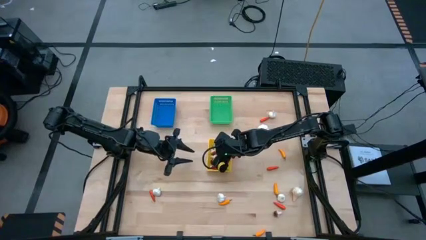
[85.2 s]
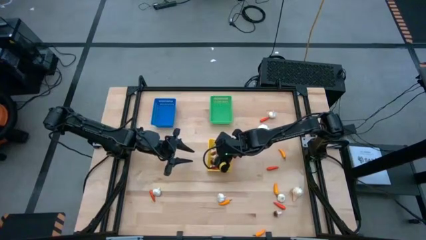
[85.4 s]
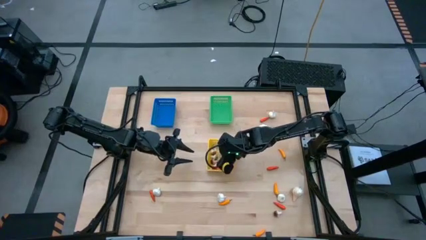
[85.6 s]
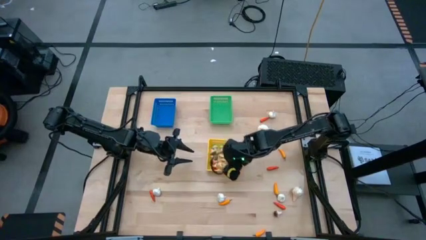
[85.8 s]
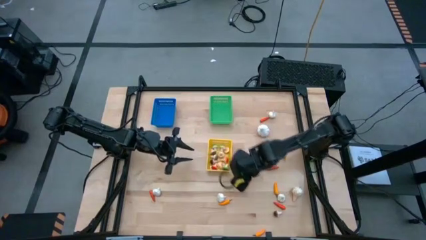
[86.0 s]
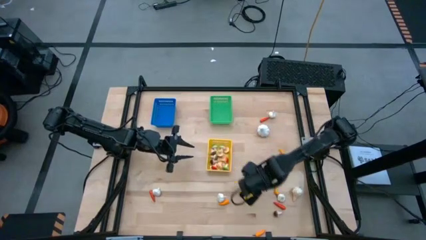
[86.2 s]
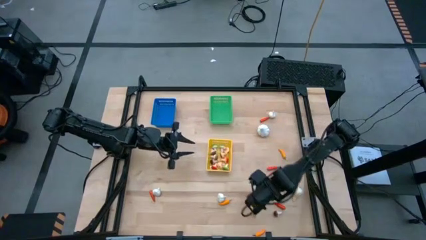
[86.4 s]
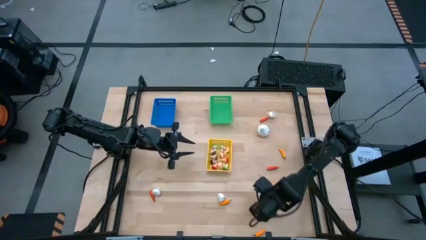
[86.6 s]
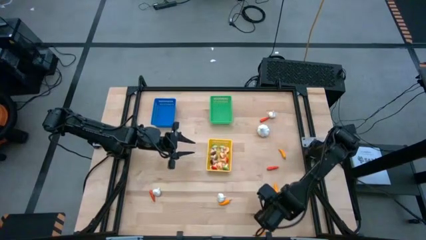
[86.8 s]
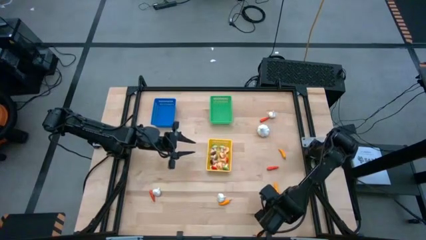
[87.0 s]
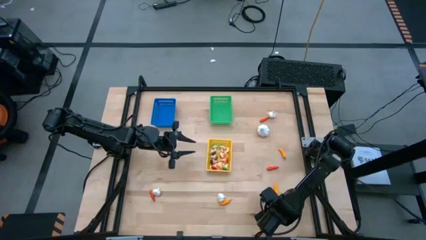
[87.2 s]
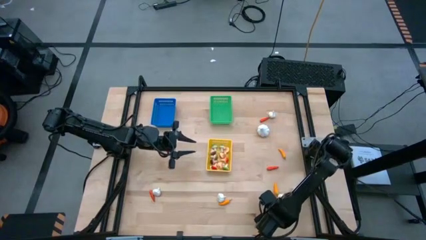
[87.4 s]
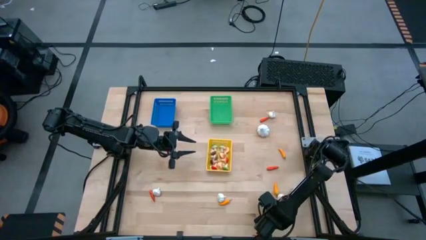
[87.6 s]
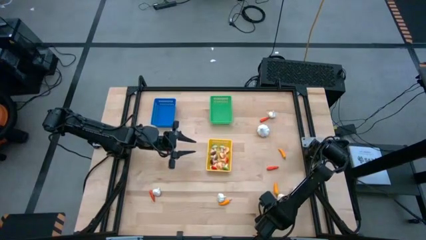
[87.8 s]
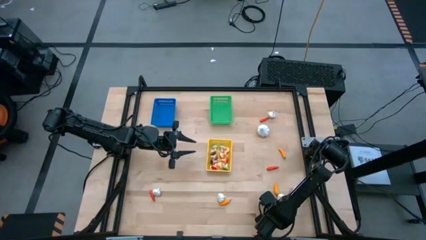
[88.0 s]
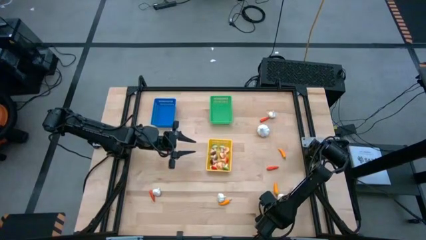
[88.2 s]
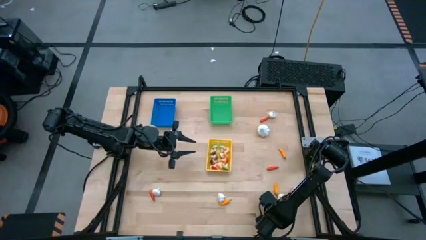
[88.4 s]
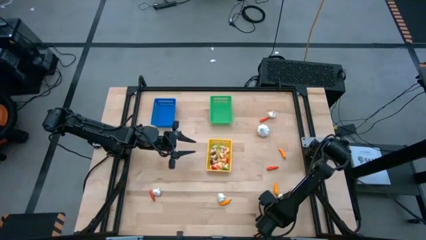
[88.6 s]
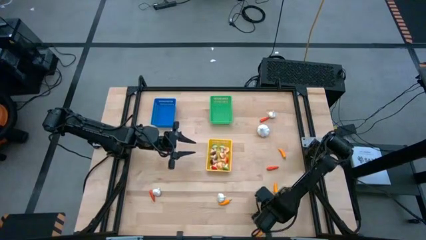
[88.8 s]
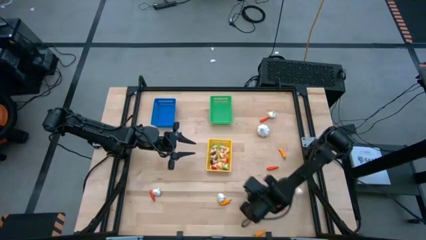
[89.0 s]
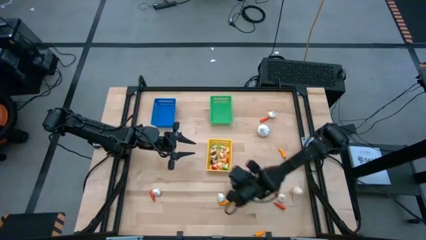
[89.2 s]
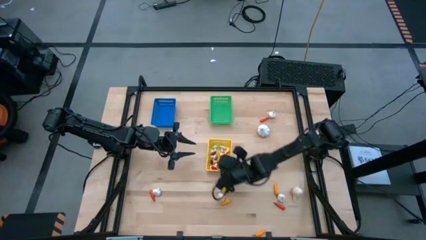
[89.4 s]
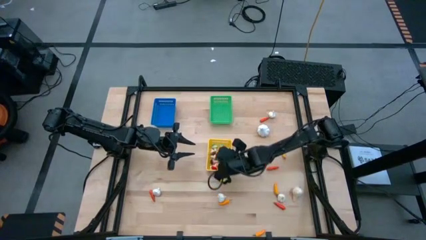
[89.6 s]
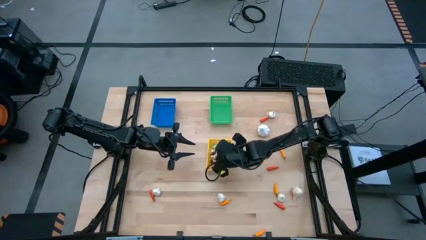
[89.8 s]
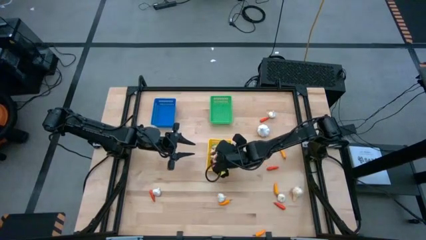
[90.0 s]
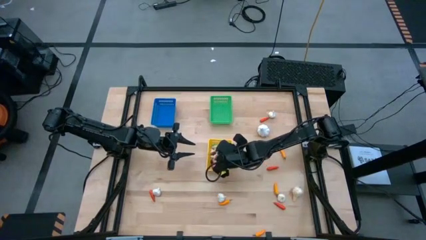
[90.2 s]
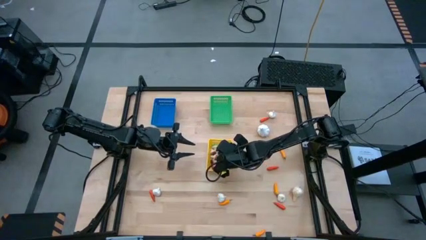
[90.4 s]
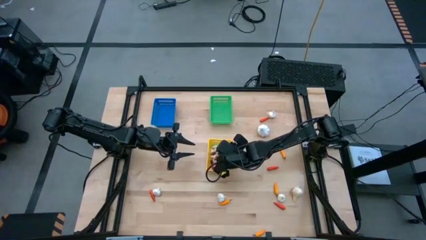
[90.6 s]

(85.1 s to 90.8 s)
Task: Sort produce into baskets
Put the brown mushroom into the yellow bin

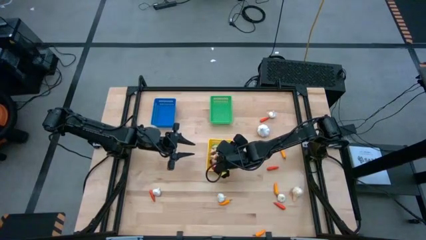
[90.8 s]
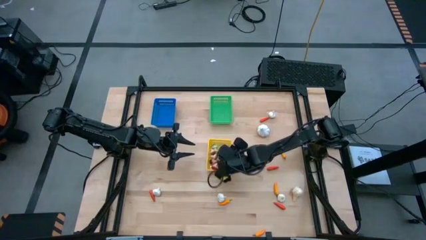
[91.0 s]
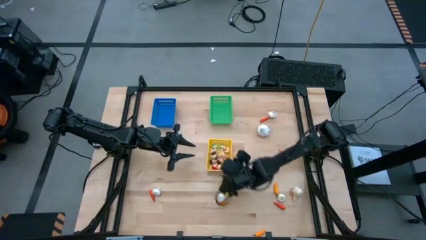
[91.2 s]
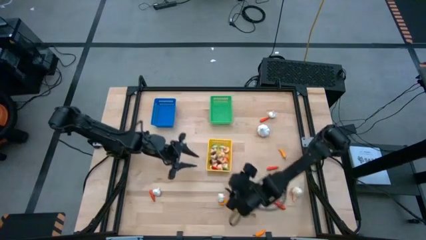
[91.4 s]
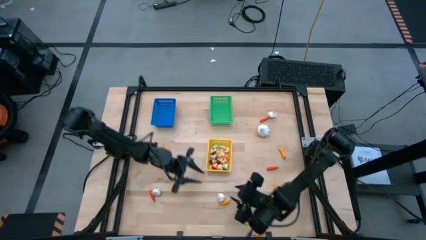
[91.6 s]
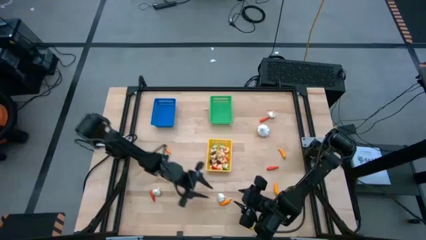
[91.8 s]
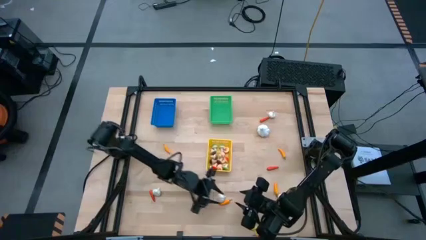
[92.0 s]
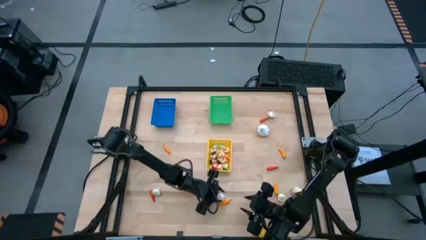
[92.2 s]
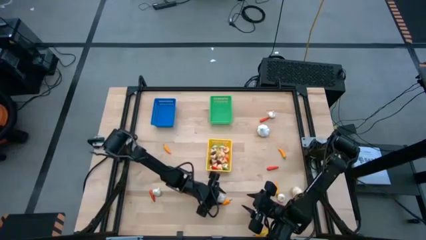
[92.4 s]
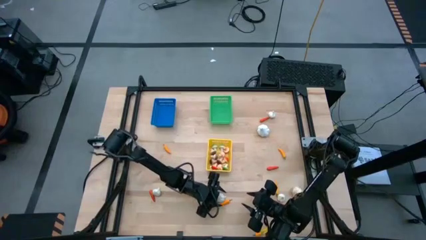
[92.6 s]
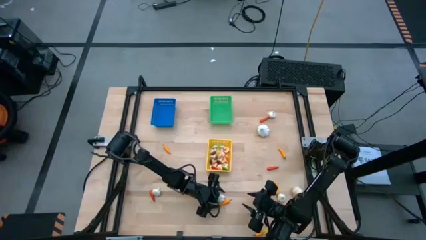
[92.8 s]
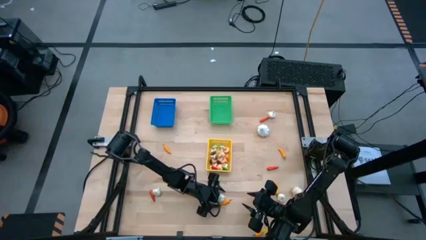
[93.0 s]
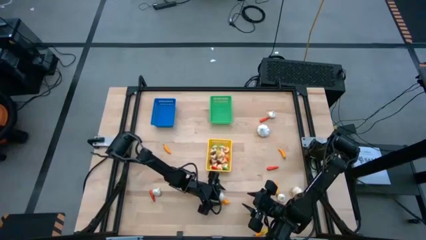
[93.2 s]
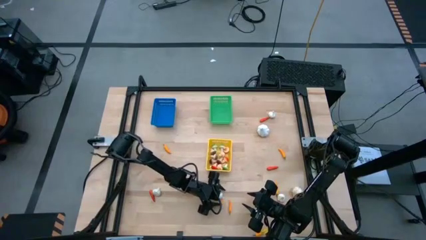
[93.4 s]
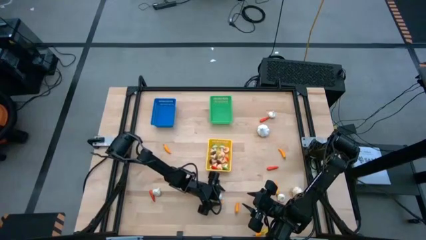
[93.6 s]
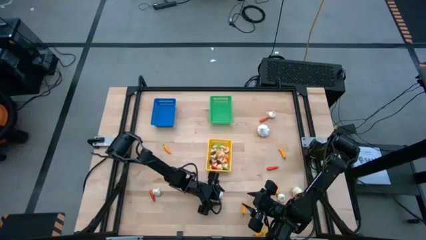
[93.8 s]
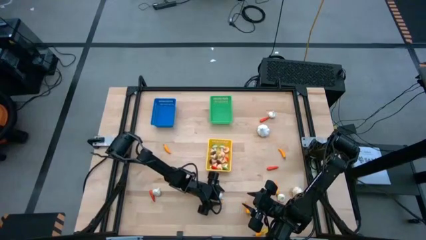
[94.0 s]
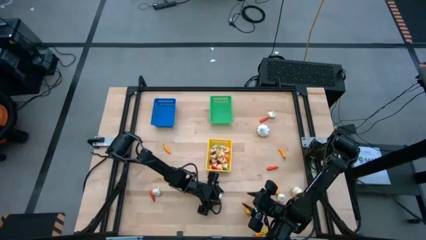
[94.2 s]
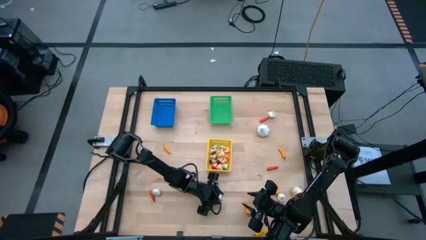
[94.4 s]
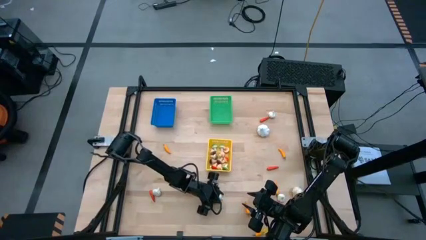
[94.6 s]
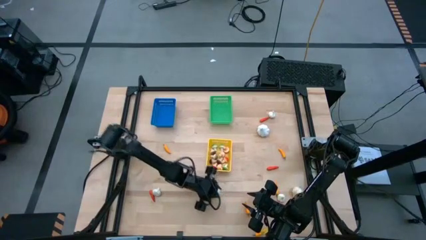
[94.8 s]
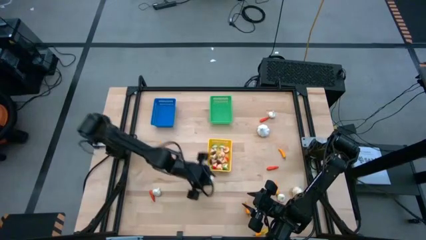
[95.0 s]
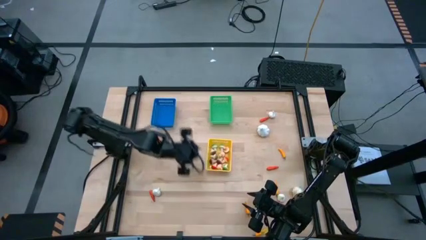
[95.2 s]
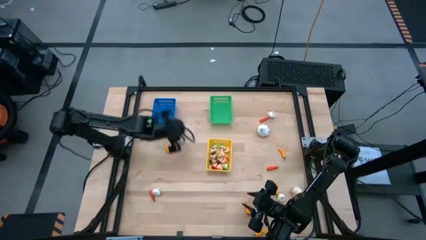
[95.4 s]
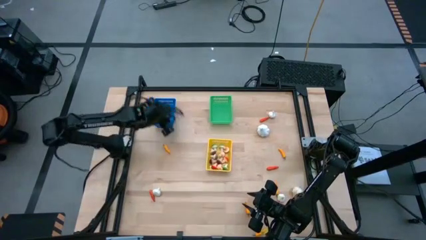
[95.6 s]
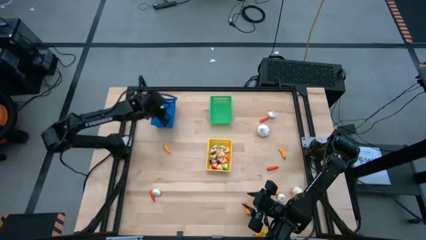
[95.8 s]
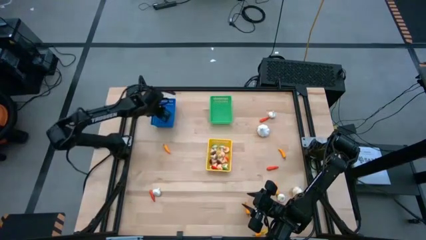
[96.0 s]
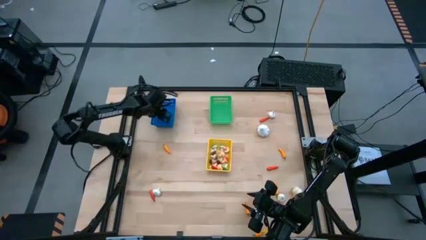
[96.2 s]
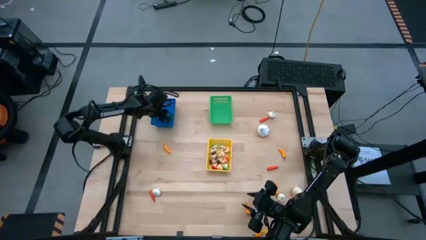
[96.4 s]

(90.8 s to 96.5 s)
Put the white garlic into the blue bin

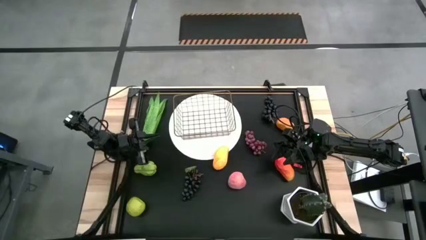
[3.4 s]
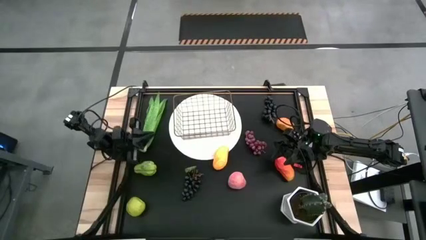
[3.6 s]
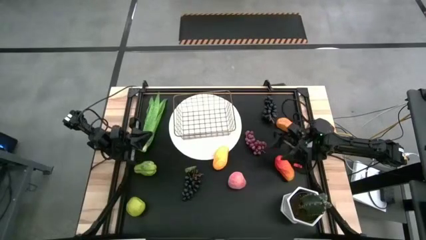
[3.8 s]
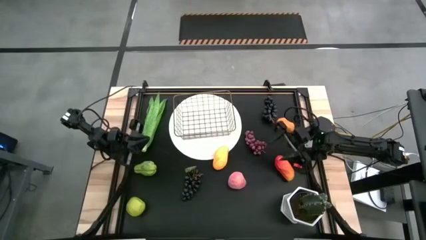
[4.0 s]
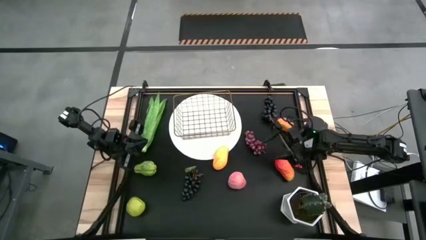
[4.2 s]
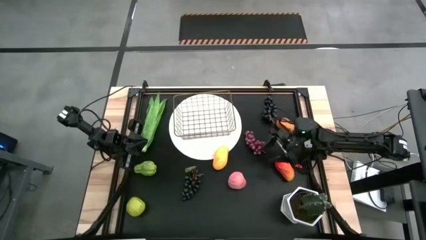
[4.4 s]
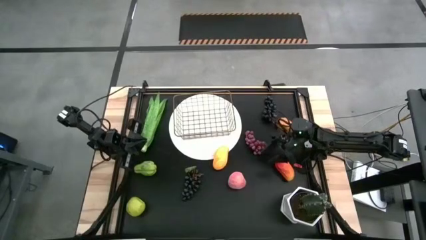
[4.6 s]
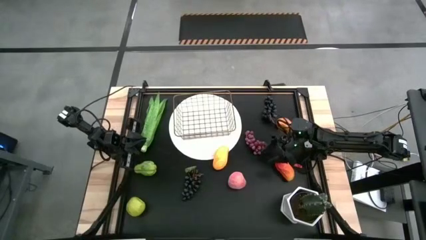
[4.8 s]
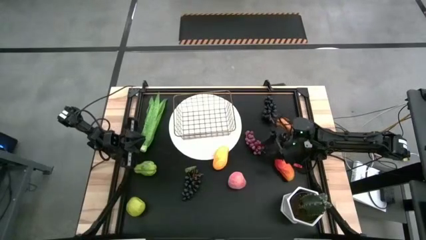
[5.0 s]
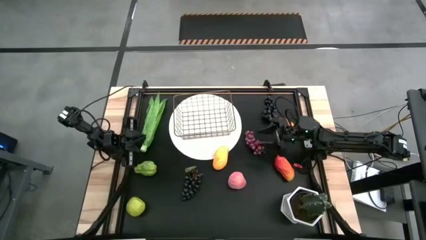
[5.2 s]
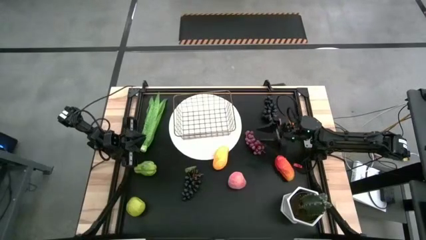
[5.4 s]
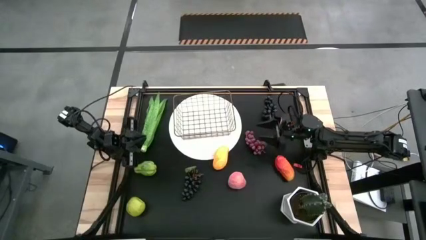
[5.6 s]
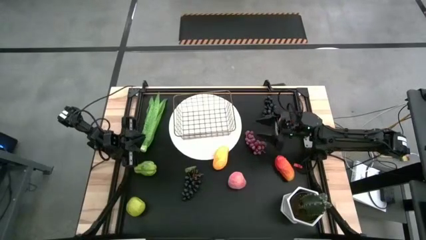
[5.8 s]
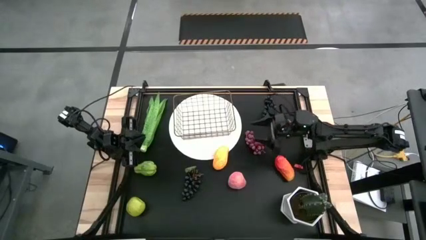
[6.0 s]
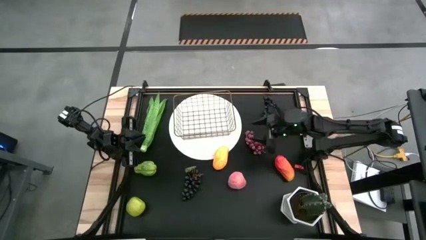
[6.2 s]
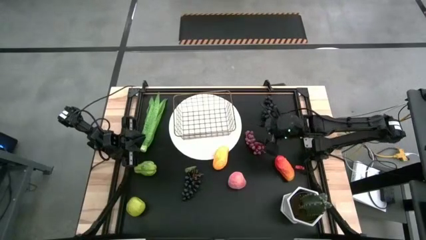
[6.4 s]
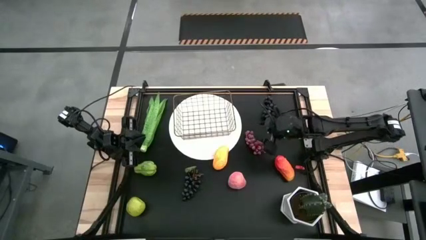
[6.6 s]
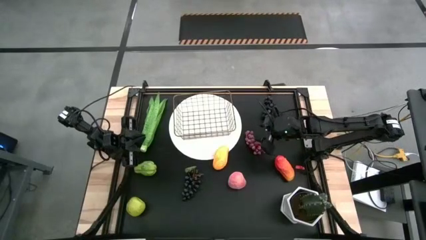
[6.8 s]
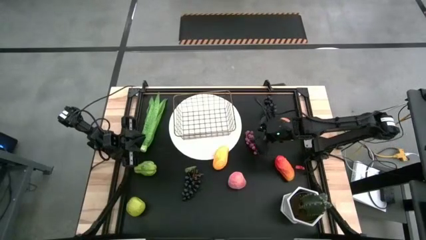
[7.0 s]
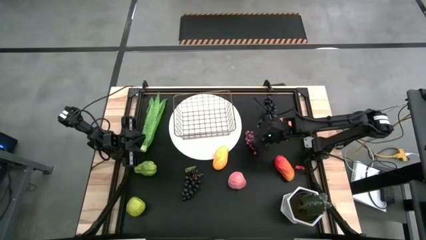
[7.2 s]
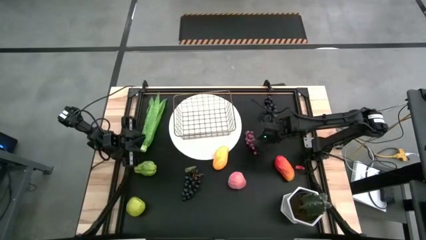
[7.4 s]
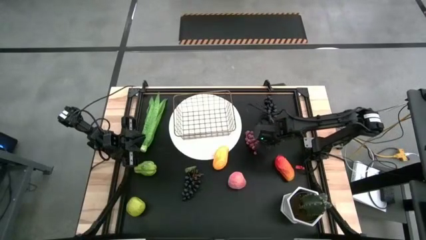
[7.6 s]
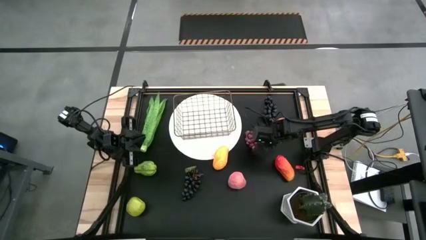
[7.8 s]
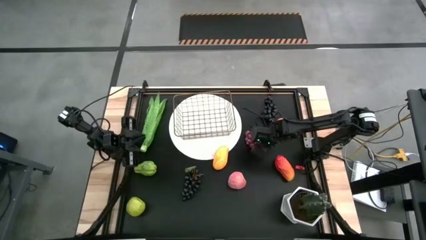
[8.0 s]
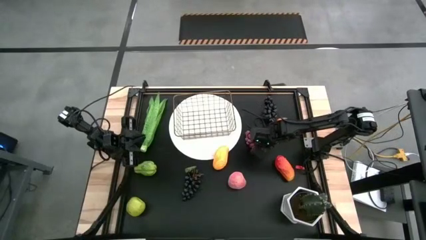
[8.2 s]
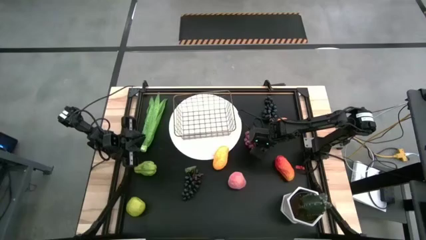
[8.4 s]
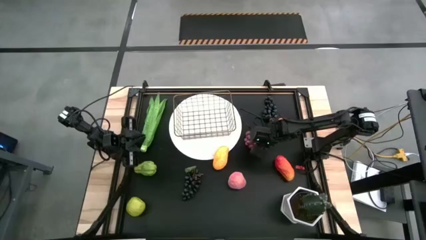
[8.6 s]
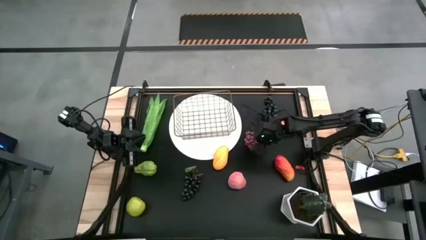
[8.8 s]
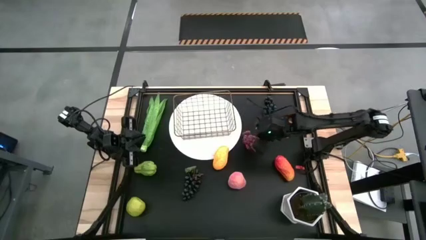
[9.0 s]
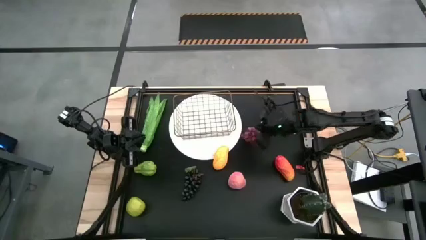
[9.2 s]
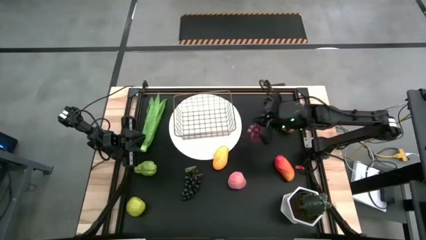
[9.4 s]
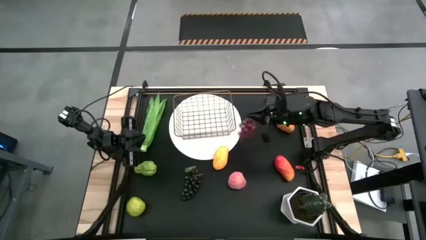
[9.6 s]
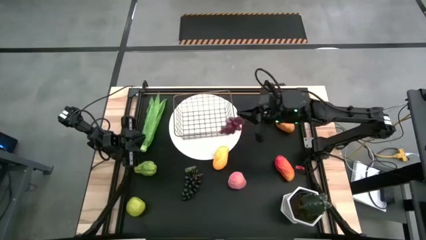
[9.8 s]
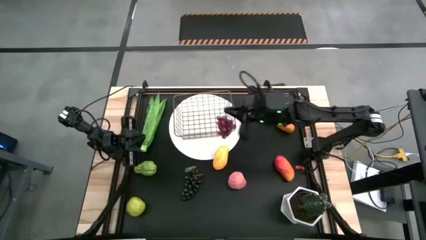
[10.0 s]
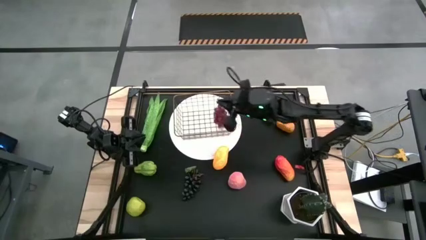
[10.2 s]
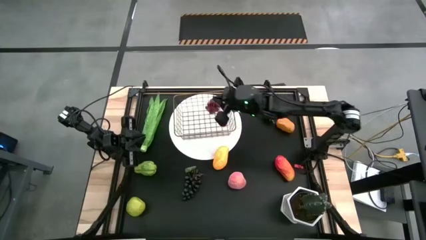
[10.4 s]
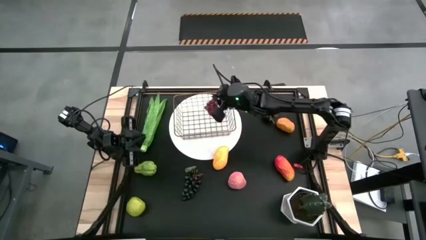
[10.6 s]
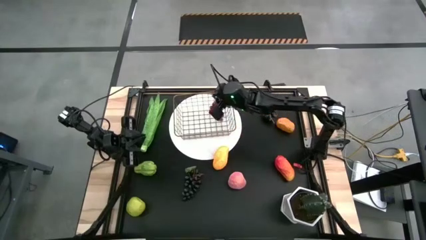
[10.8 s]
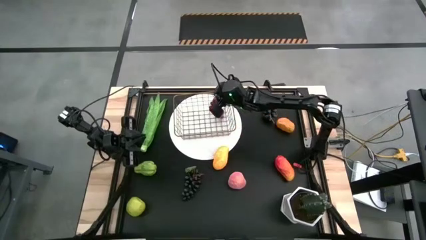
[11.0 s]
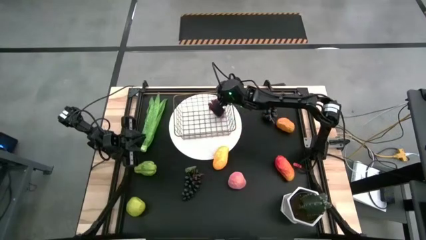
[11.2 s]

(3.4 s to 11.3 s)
Task: Build produce basket
Put the red grapes into the gold wire basket
